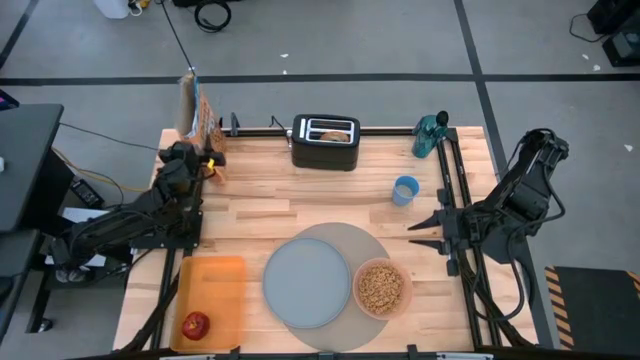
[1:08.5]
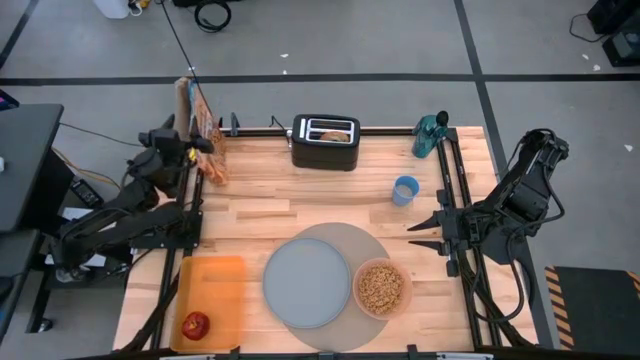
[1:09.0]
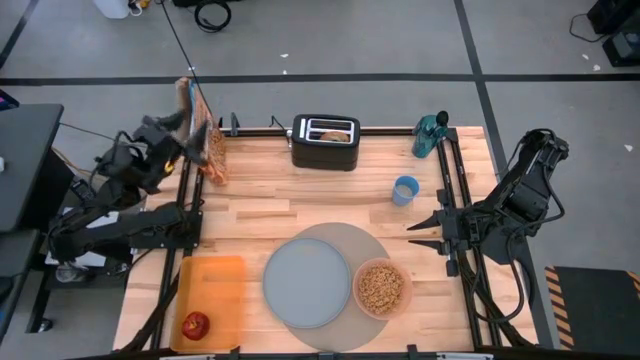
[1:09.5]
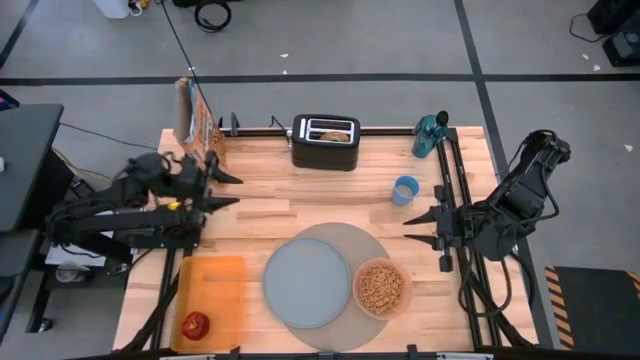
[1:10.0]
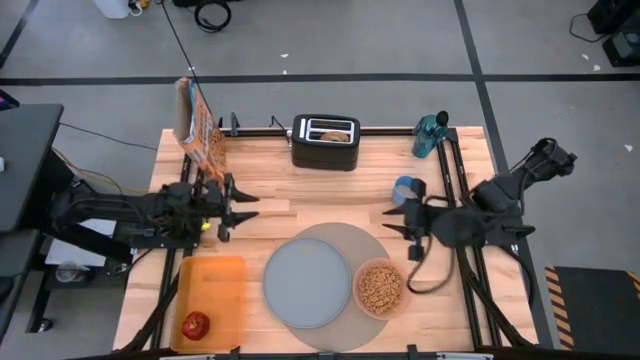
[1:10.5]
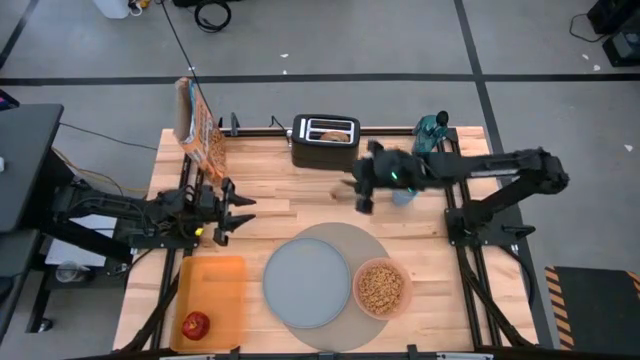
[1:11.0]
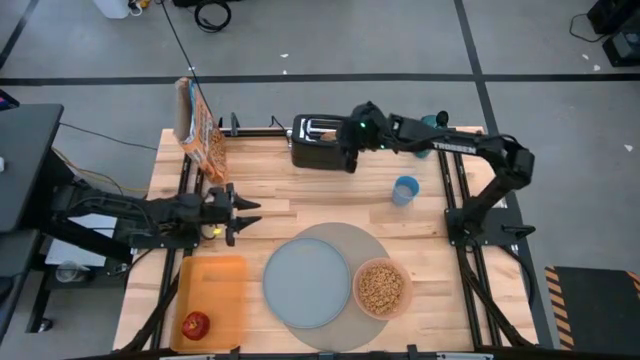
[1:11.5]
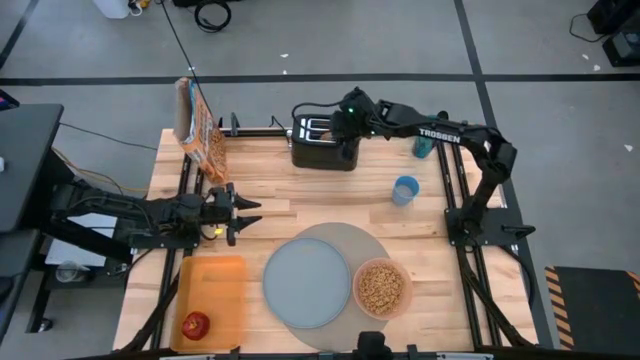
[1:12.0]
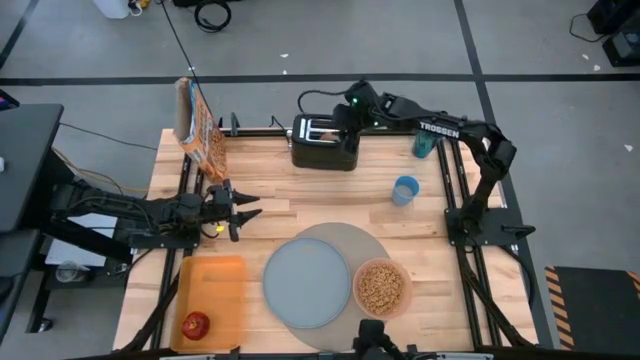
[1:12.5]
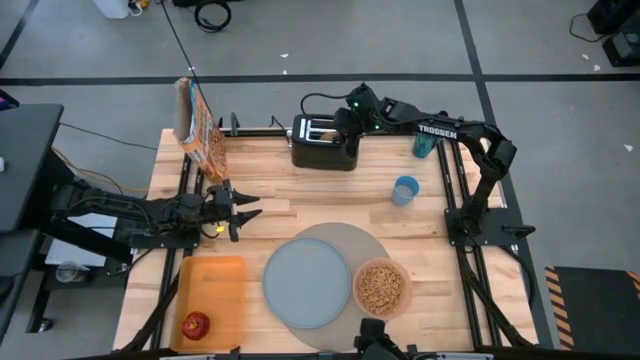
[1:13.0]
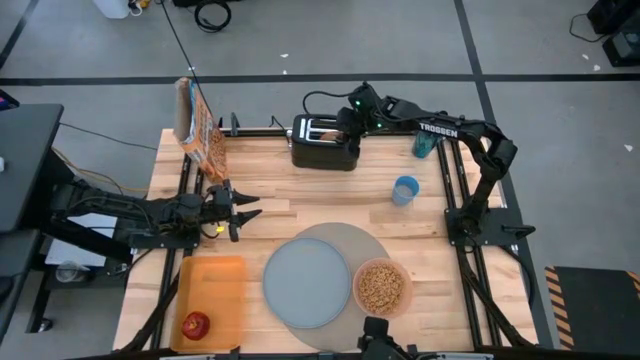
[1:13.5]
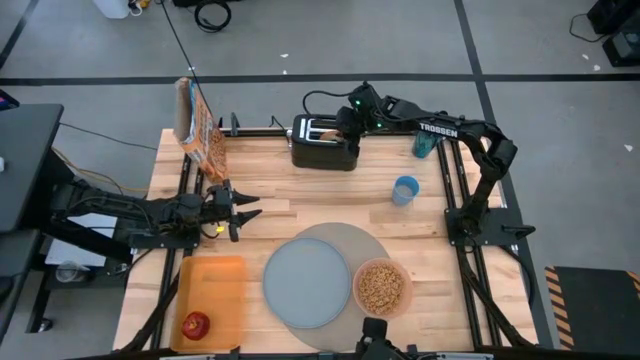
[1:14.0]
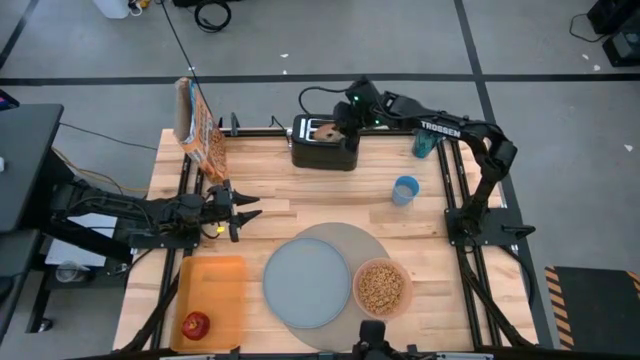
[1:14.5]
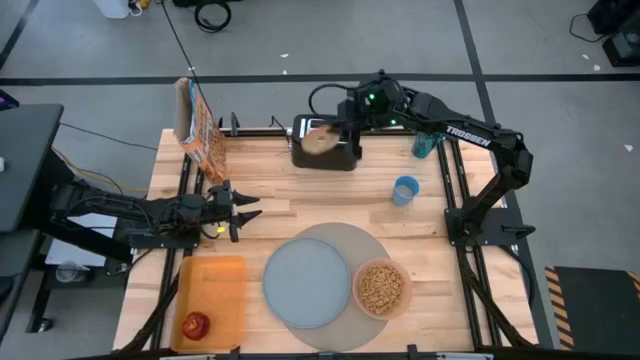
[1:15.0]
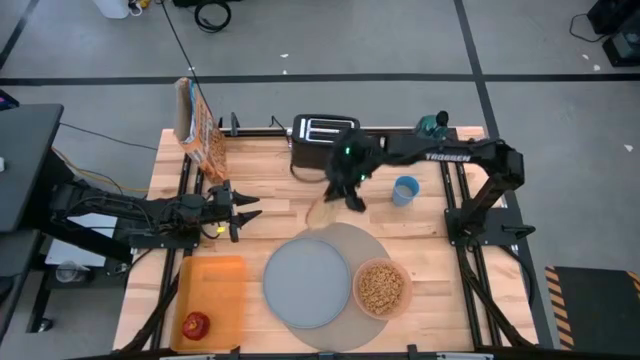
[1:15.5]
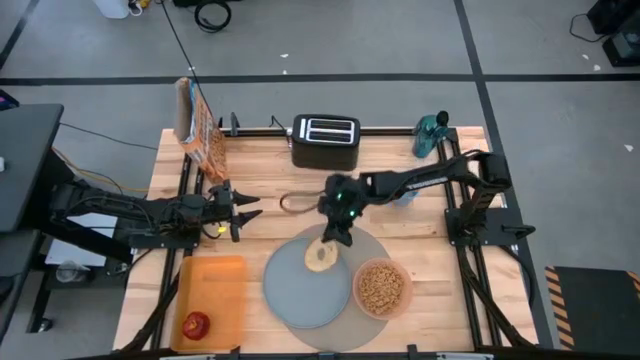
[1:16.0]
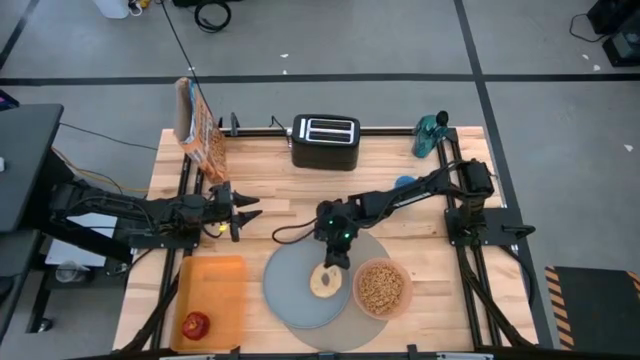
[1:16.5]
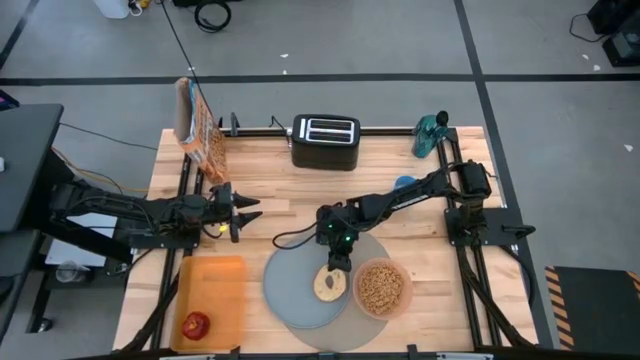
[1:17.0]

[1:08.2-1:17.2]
Task: Arrange a breakfast setting
Put bagel on the blue plate

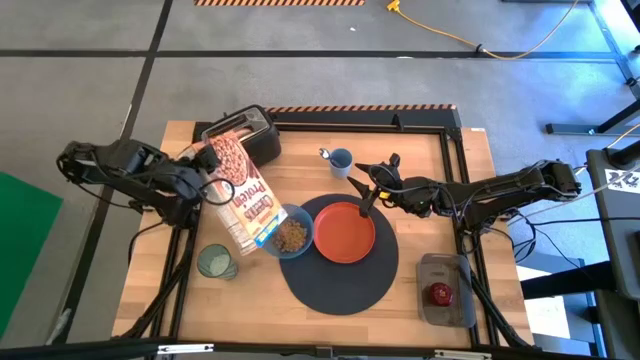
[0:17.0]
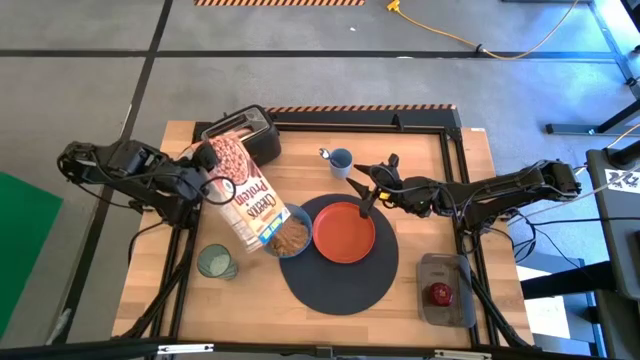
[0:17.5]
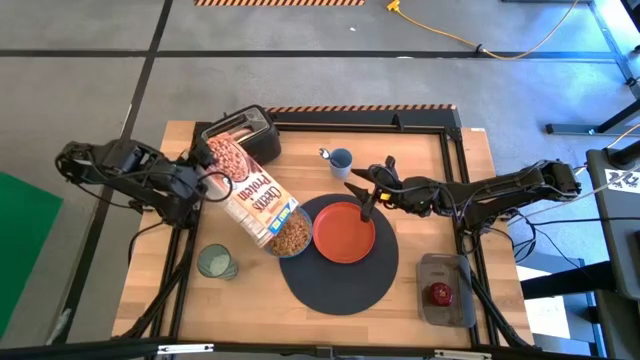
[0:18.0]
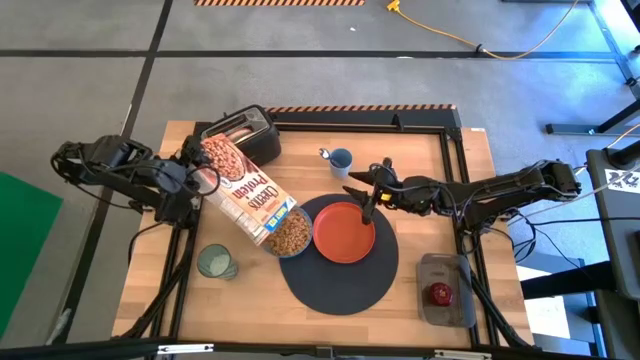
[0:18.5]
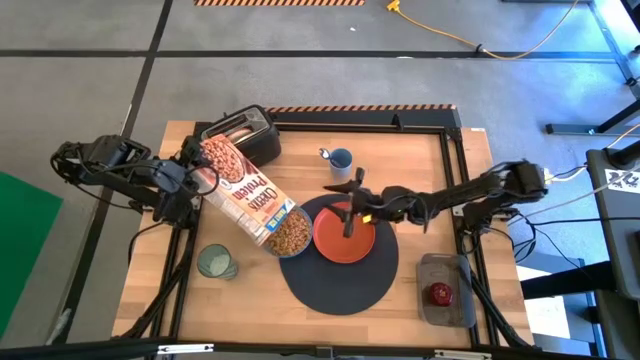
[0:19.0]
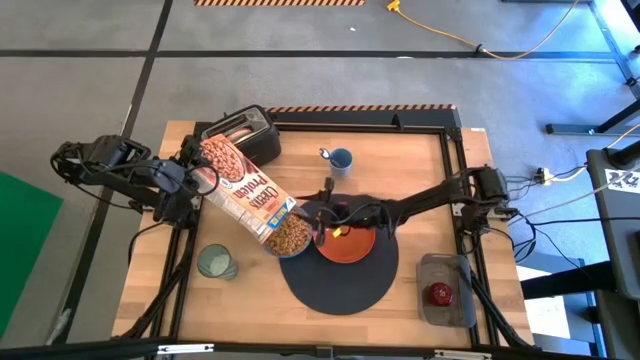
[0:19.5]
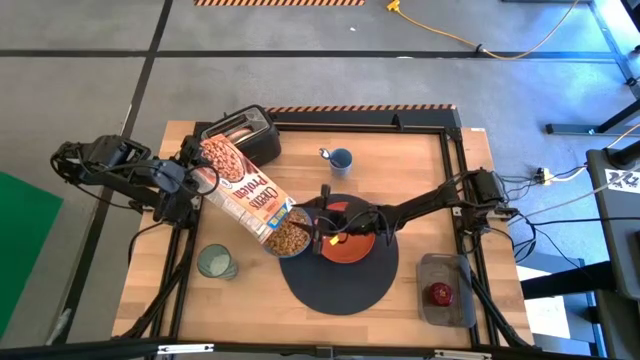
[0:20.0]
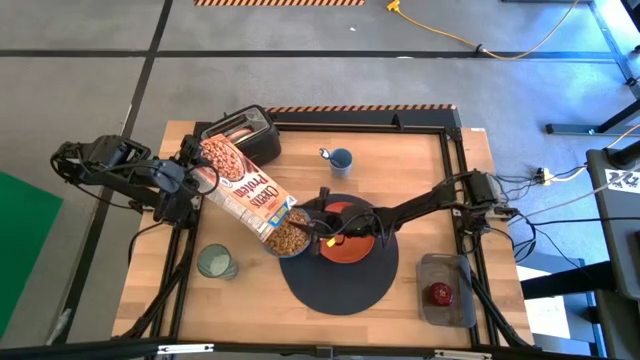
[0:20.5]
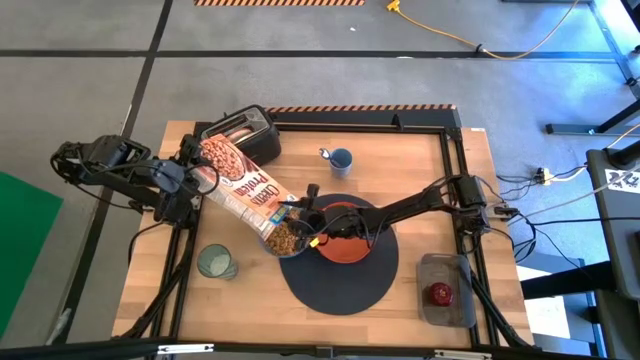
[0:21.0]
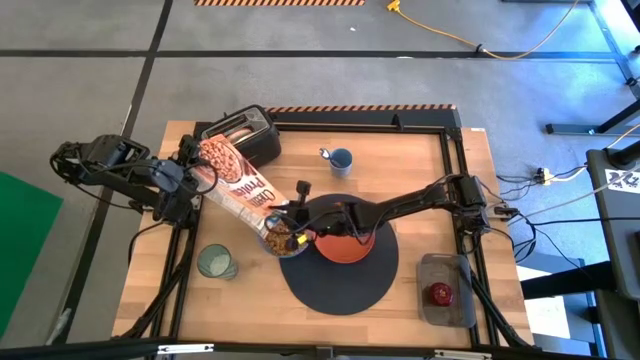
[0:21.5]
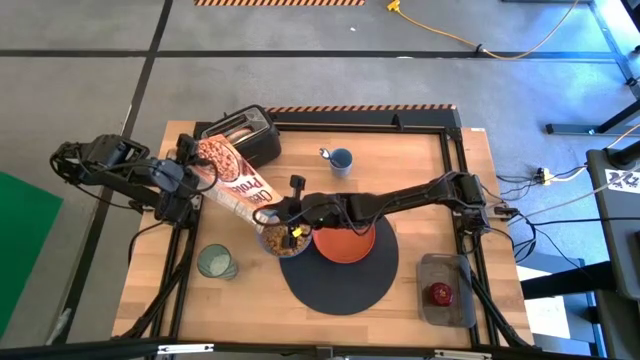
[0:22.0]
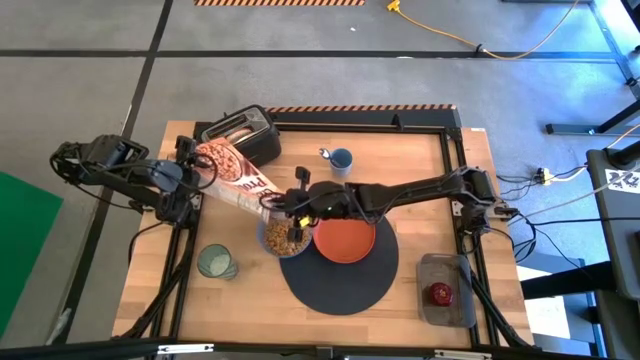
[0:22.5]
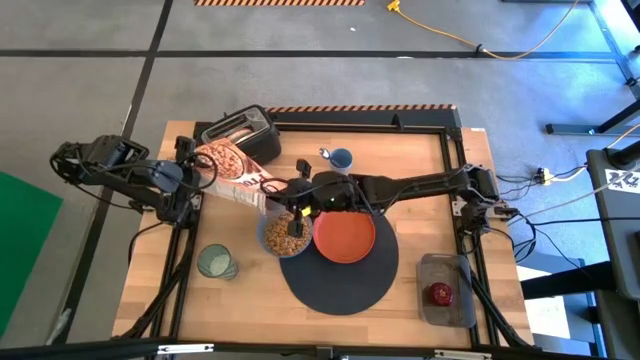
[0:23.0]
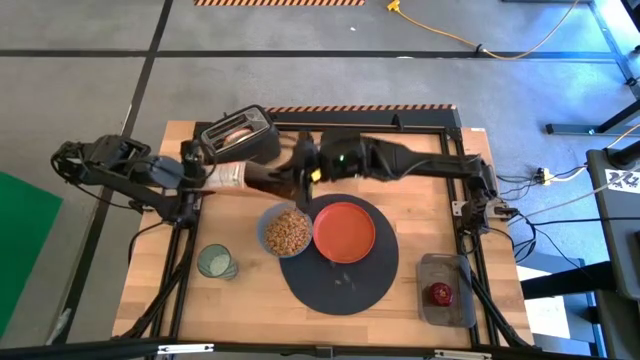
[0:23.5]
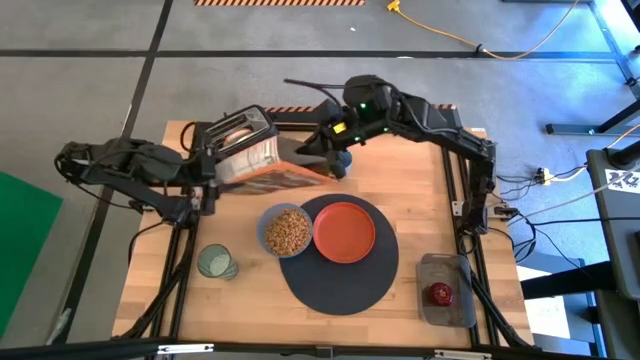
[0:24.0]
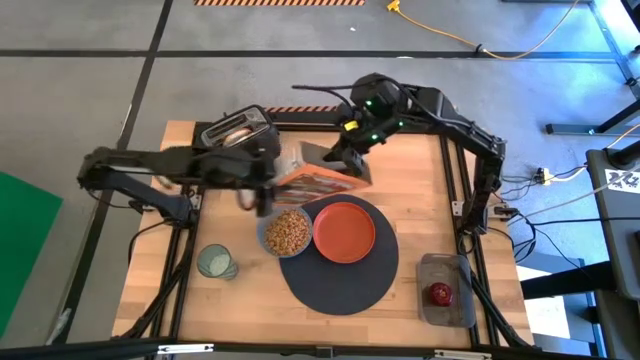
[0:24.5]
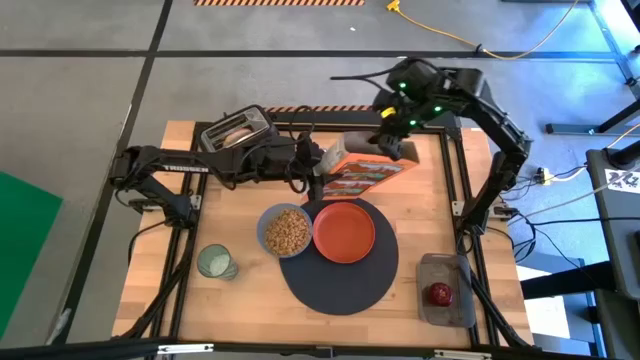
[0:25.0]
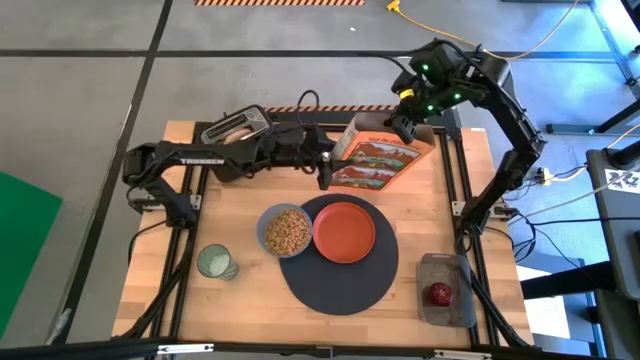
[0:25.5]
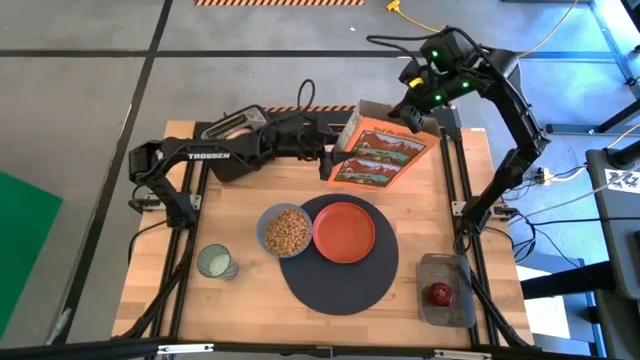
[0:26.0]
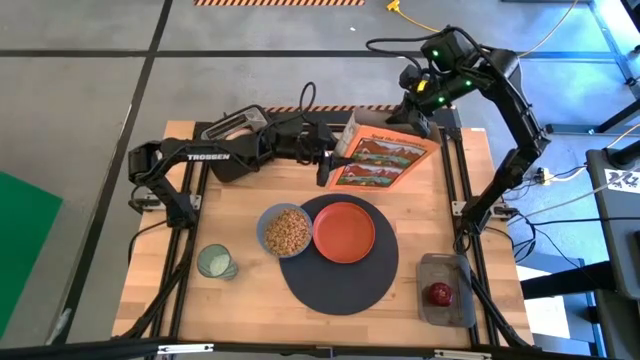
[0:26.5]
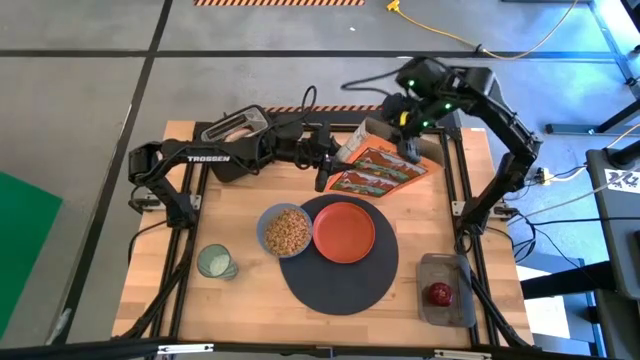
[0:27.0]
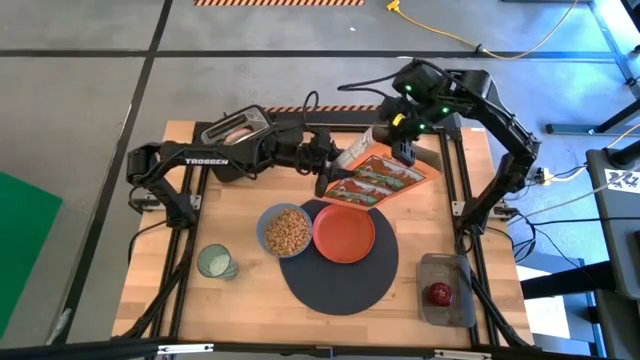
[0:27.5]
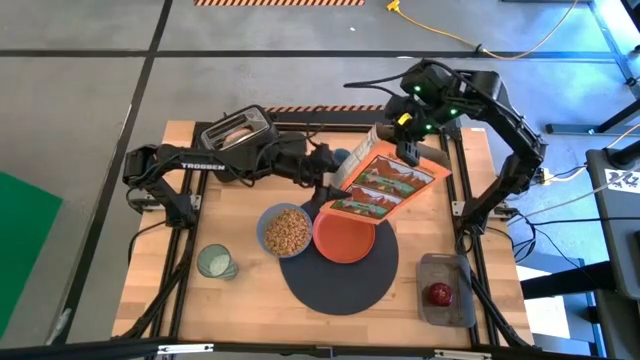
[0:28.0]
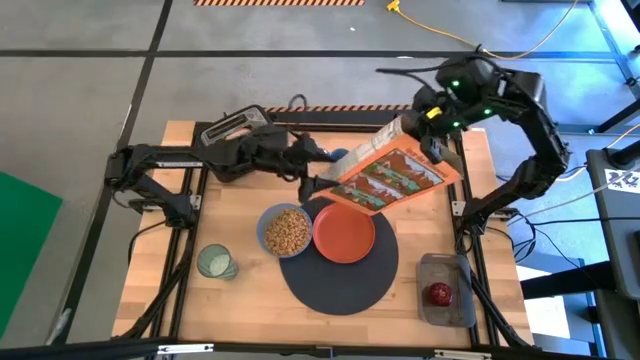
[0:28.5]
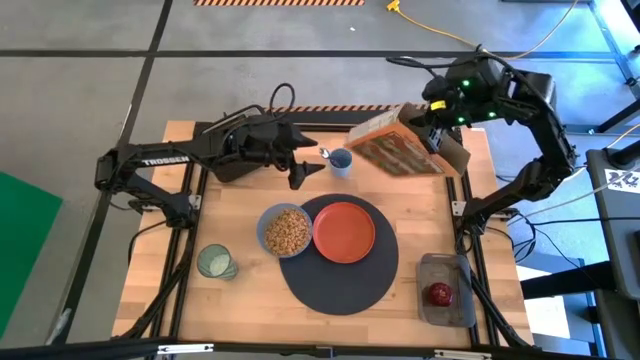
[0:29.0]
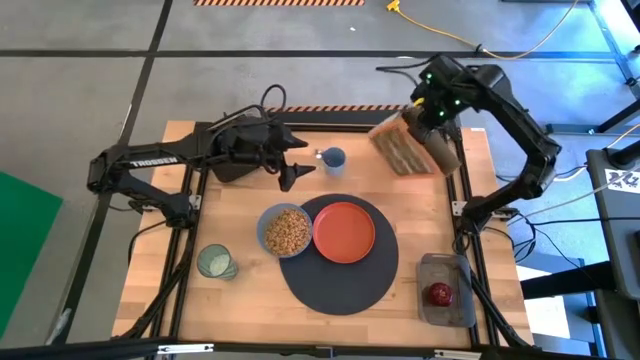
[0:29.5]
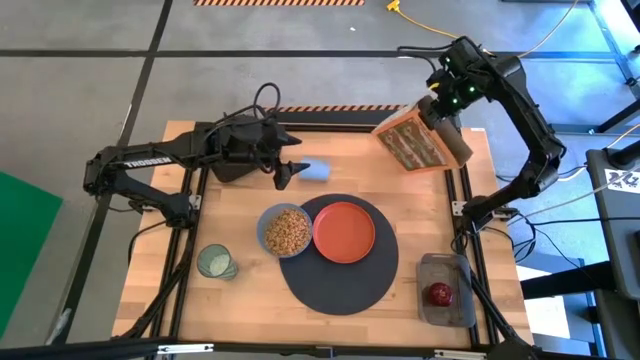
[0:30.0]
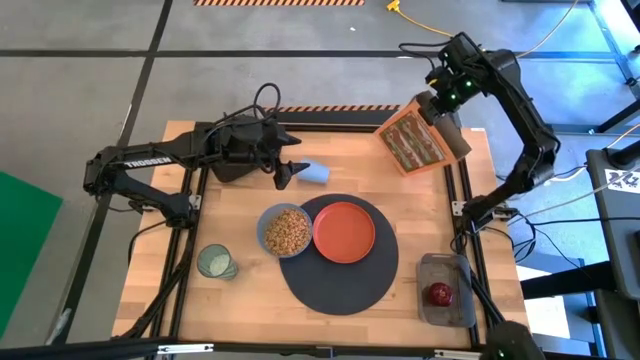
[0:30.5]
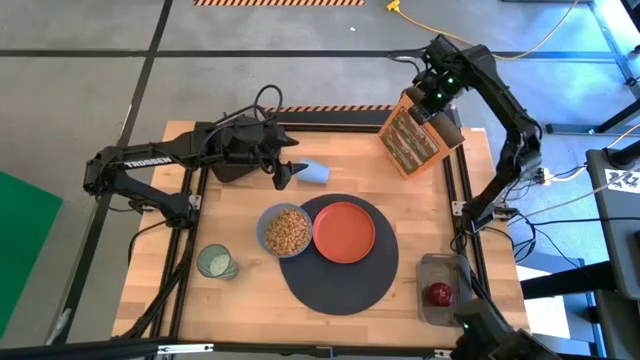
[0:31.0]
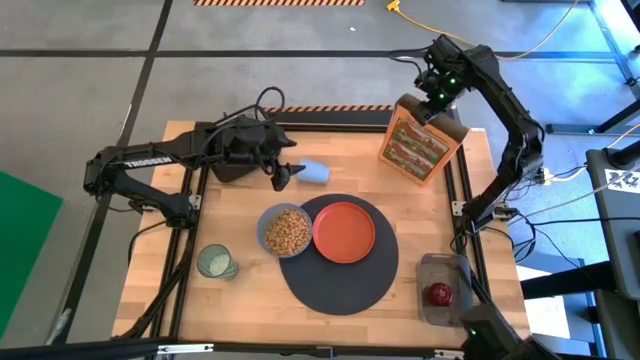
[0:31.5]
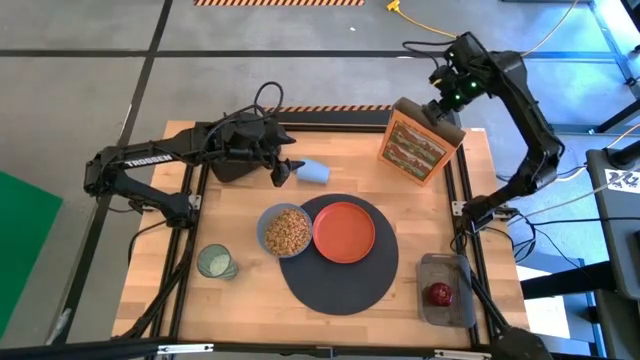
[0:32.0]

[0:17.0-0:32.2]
Task: Arrange a breakfast setting
Pour the cereal from the cereal box into the blue bowl
